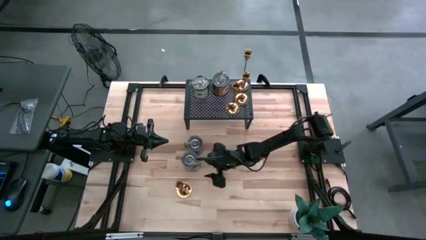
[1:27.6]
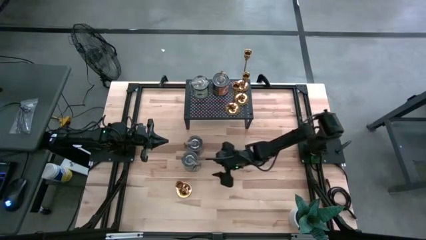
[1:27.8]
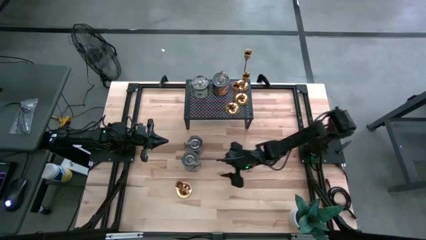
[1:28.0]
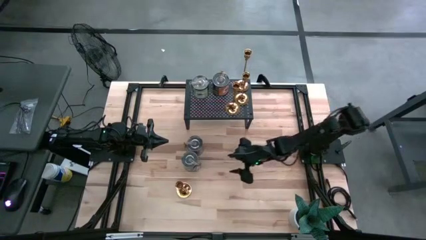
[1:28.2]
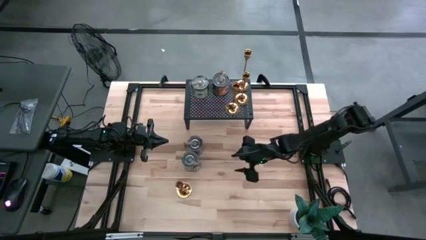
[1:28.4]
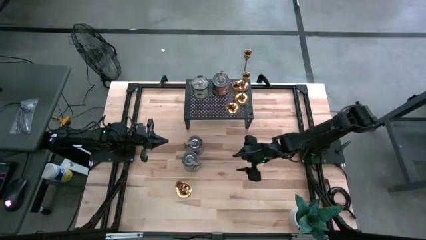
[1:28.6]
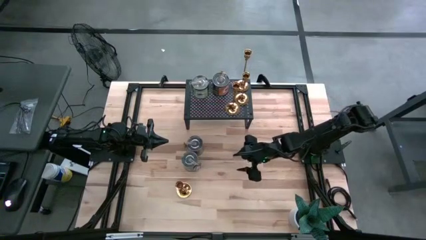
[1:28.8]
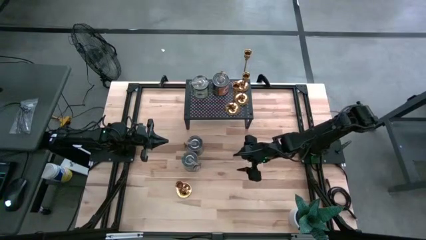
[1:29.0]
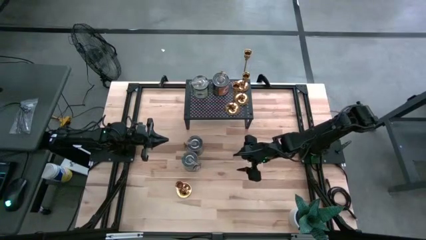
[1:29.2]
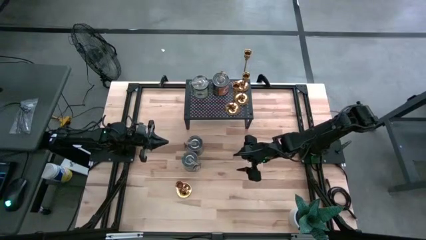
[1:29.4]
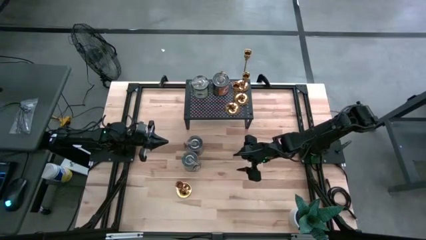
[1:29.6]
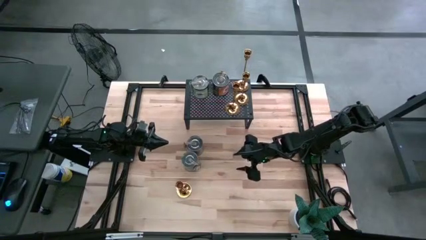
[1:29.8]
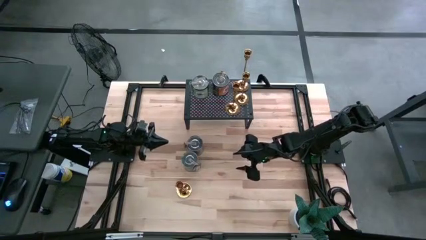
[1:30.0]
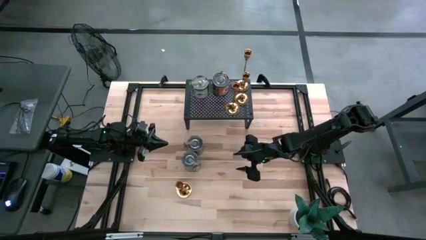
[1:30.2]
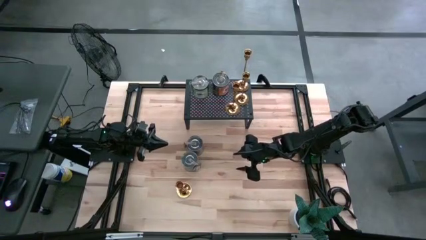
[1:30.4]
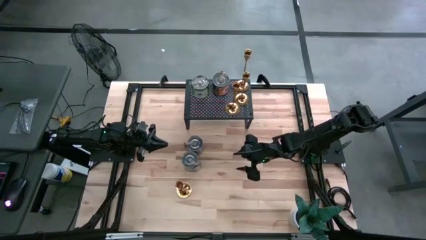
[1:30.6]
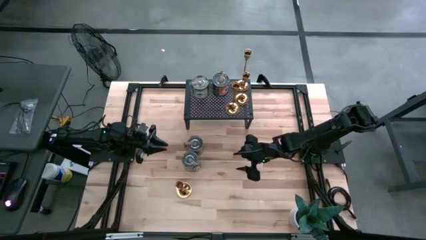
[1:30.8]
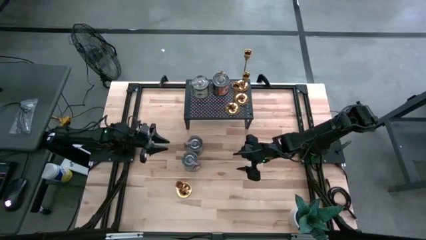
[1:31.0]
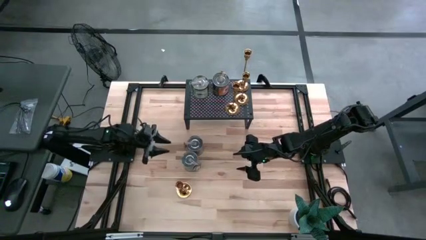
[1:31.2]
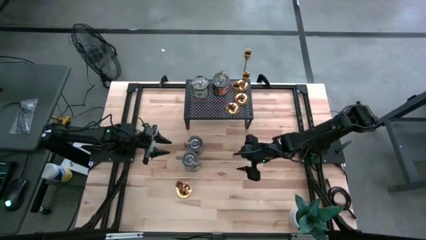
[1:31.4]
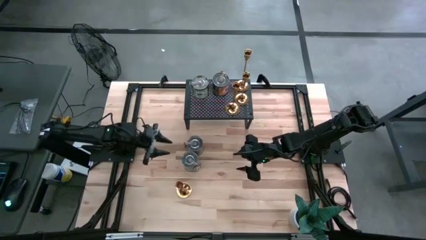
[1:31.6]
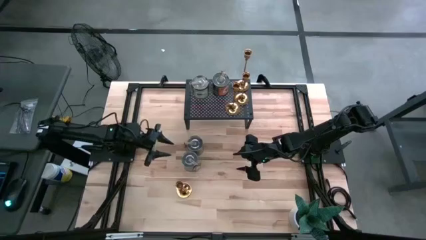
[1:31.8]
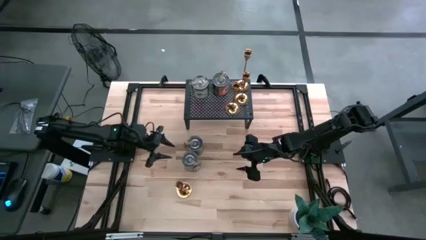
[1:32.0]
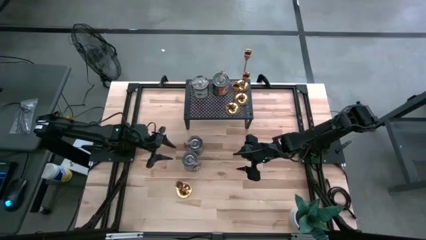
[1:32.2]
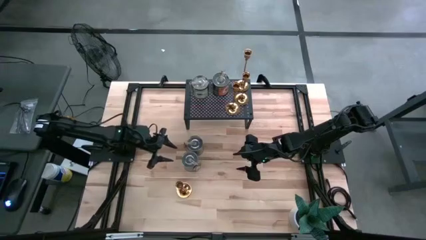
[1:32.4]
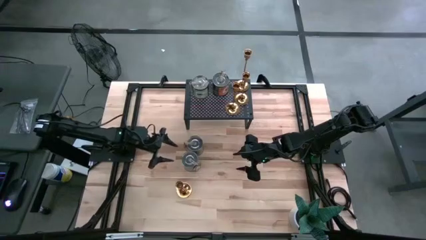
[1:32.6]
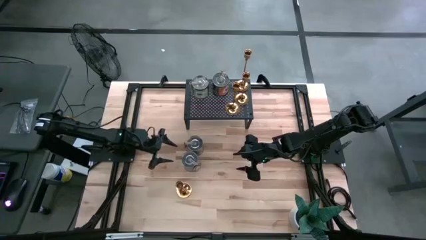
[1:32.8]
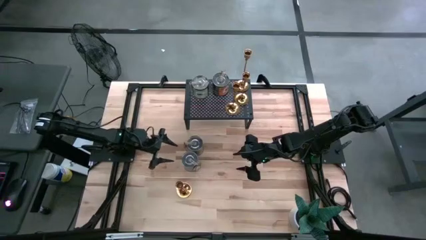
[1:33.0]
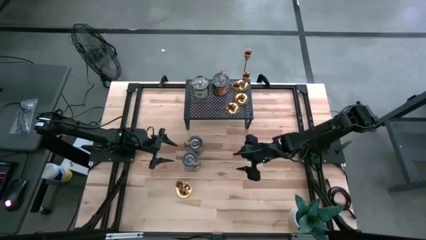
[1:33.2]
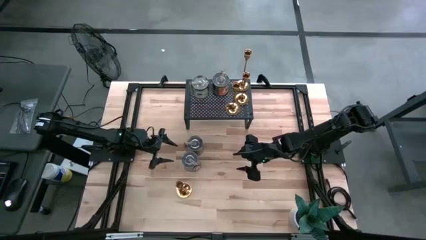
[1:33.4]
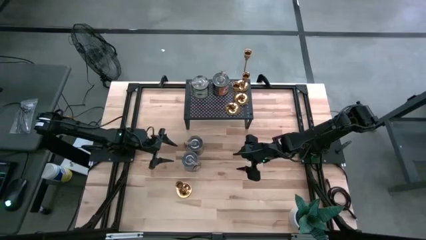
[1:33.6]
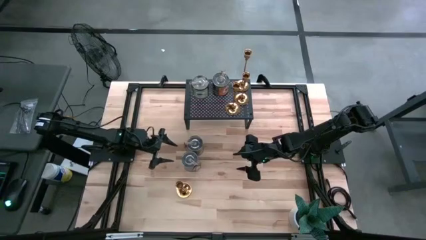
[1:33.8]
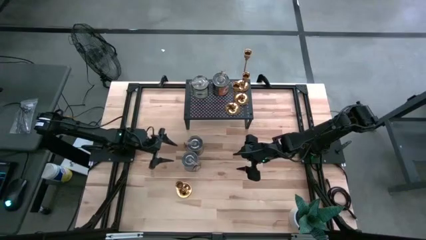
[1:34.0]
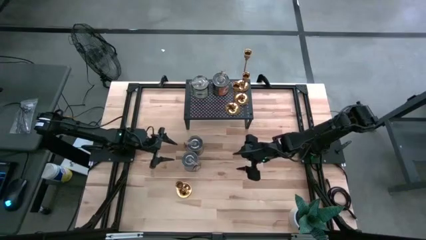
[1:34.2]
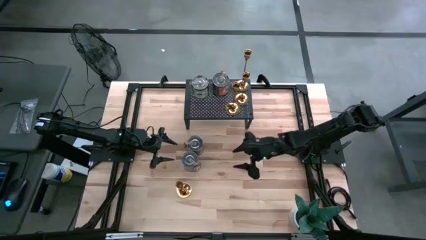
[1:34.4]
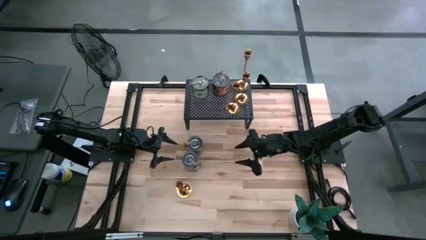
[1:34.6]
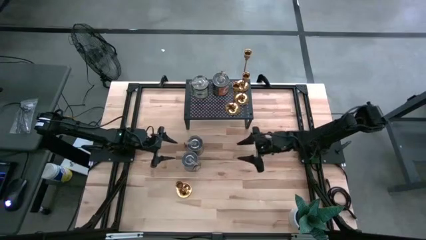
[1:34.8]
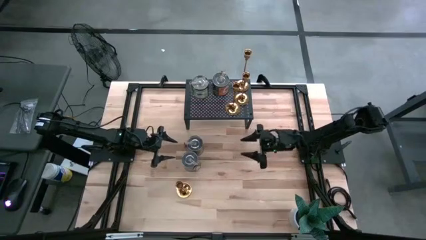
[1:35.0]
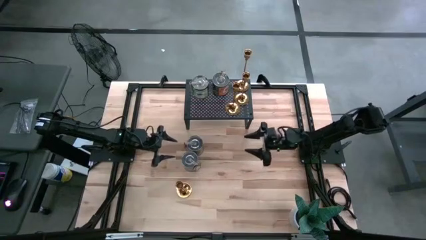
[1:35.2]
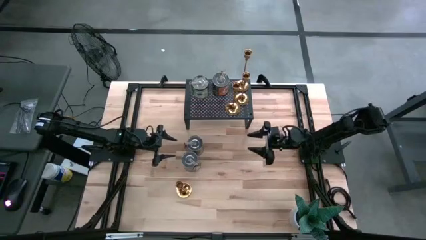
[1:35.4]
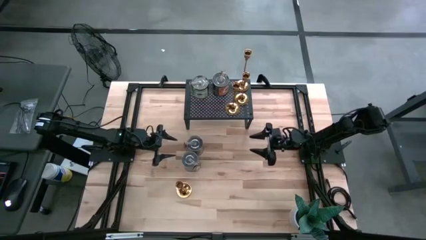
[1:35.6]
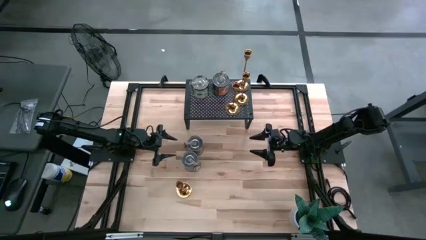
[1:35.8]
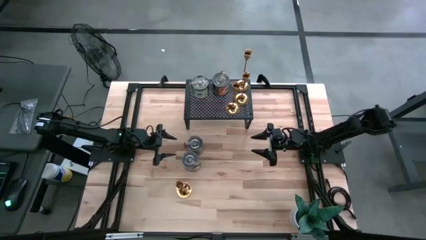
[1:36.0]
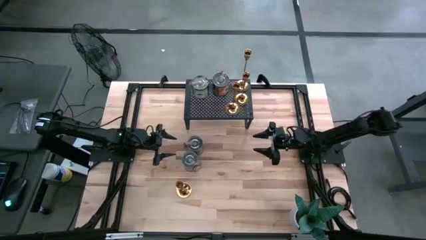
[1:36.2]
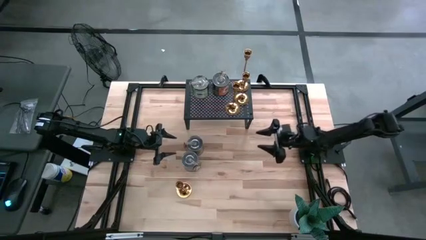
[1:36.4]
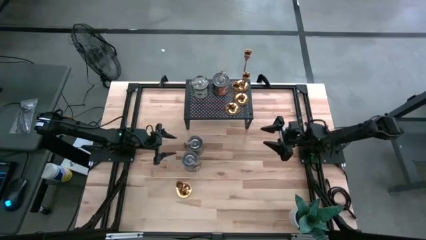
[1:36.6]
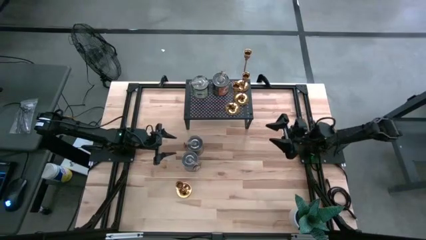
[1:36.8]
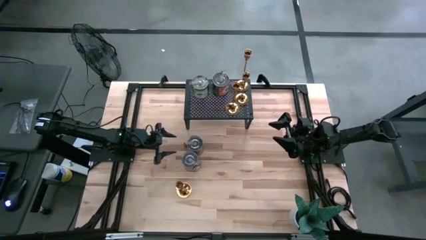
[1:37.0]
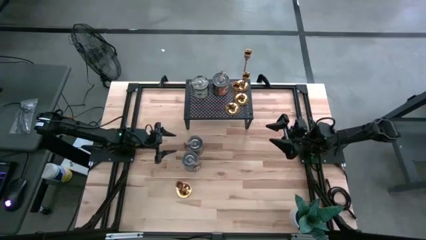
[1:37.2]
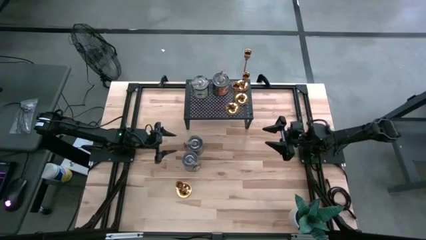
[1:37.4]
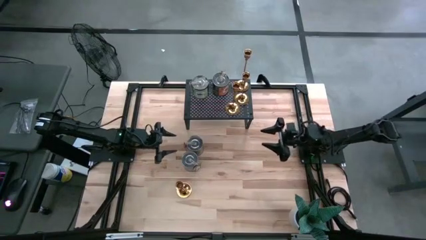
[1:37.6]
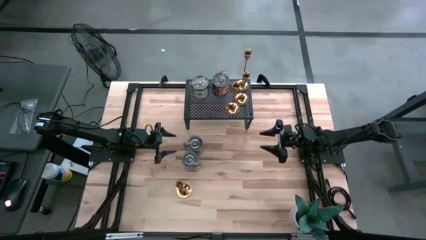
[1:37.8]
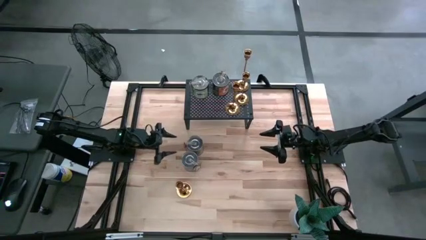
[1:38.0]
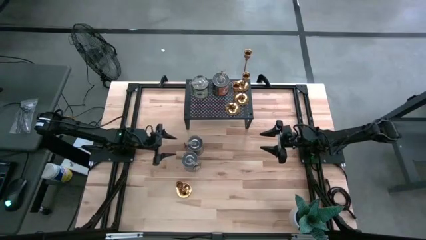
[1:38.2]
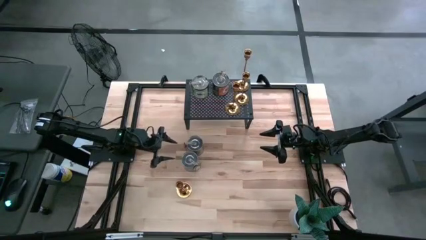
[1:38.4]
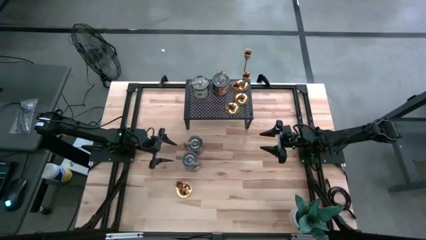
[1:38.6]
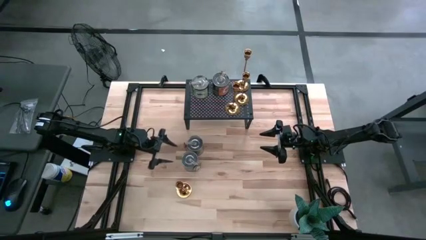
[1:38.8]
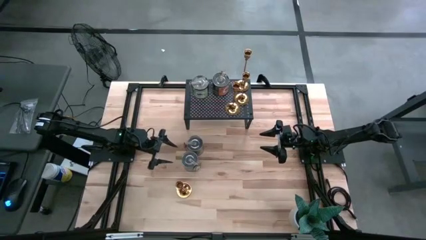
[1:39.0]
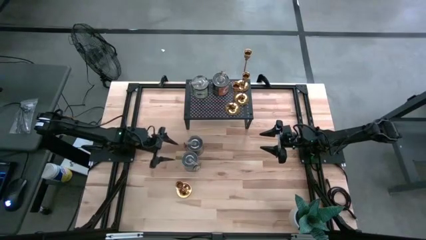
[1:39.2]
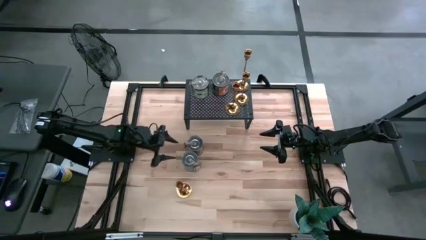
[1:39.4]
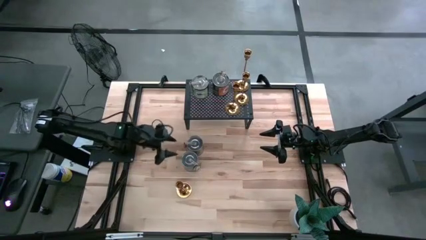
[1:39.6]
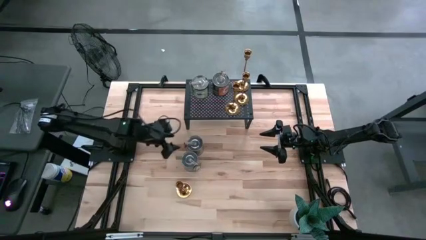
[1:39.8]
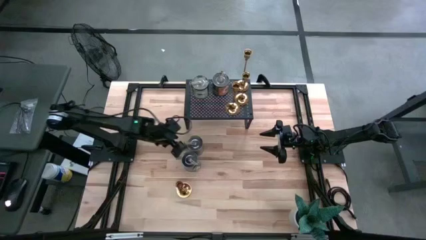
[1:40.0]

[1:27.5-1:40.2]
Task: Pick & Place candle stick holders
Align the brown scented candle with the orange scented candle on the shelf

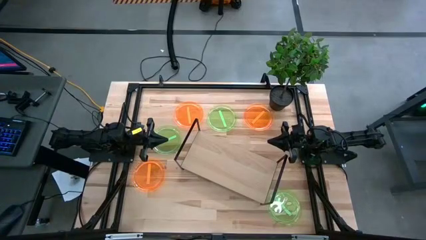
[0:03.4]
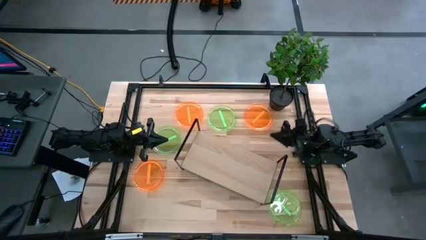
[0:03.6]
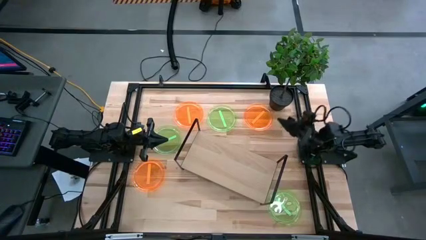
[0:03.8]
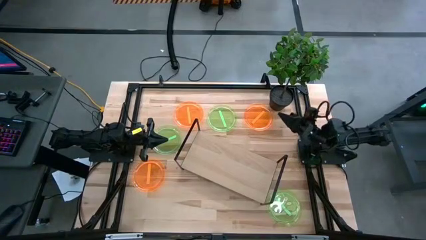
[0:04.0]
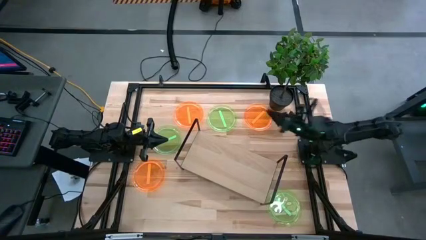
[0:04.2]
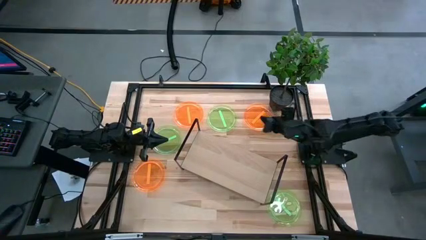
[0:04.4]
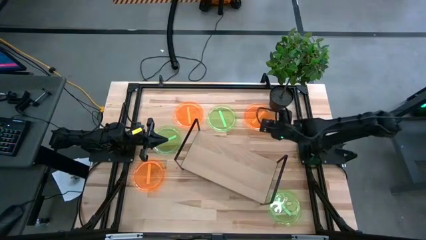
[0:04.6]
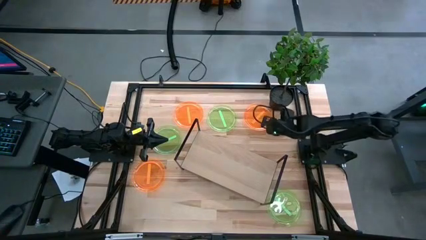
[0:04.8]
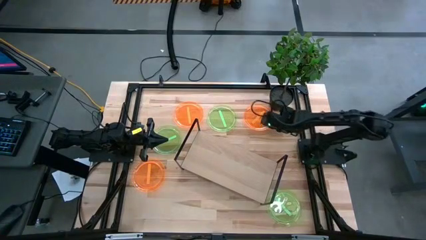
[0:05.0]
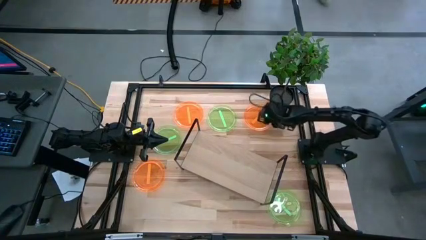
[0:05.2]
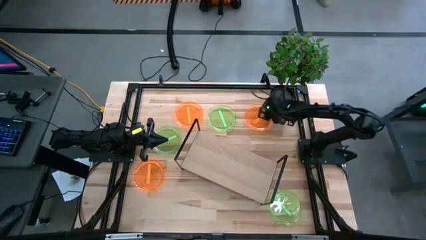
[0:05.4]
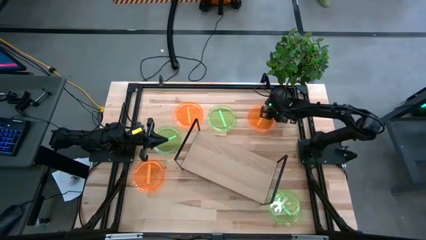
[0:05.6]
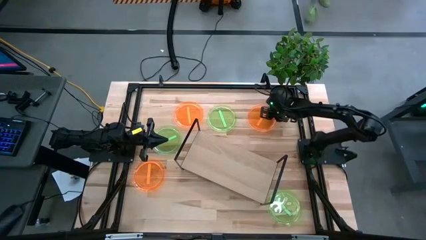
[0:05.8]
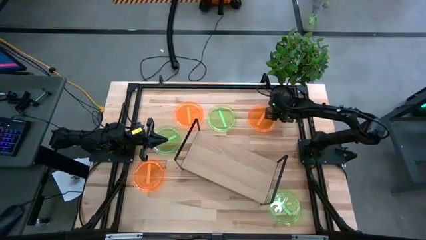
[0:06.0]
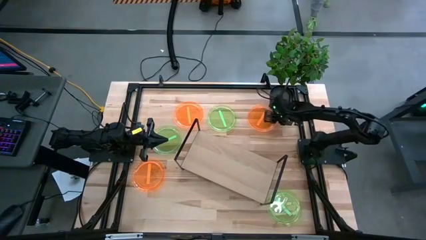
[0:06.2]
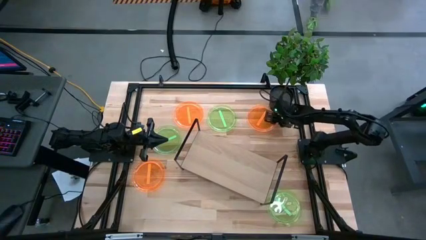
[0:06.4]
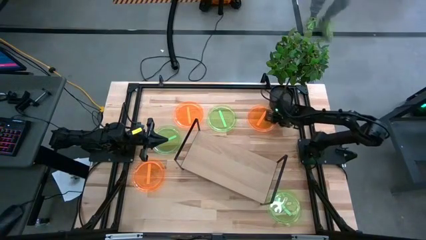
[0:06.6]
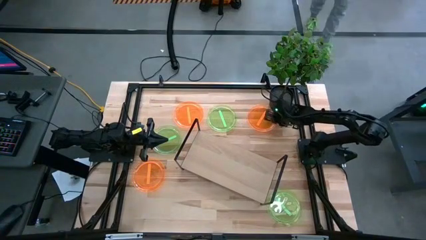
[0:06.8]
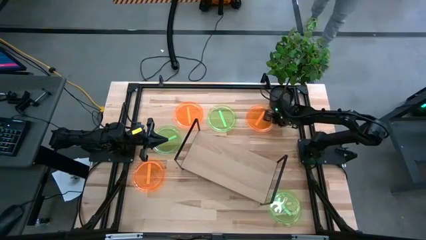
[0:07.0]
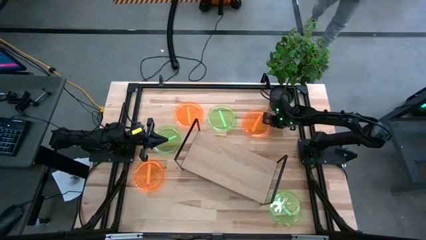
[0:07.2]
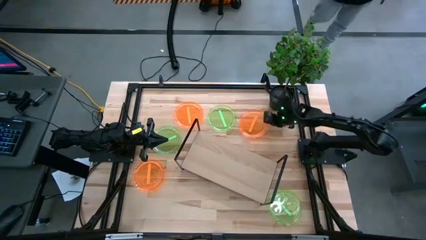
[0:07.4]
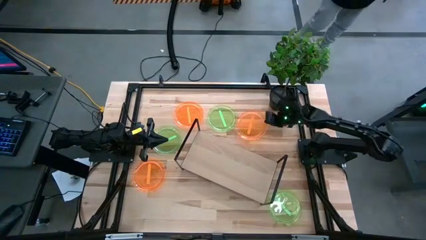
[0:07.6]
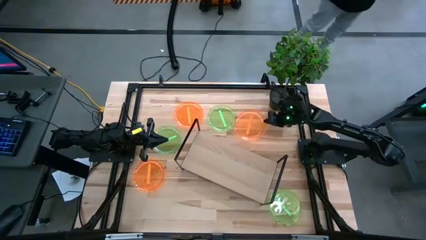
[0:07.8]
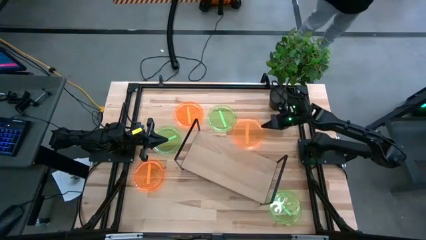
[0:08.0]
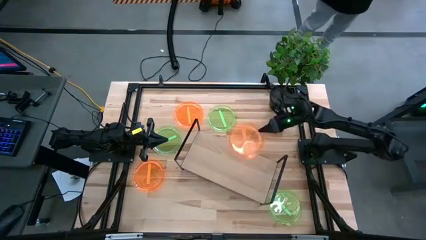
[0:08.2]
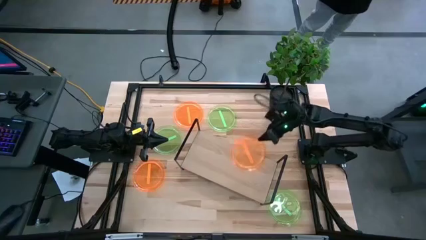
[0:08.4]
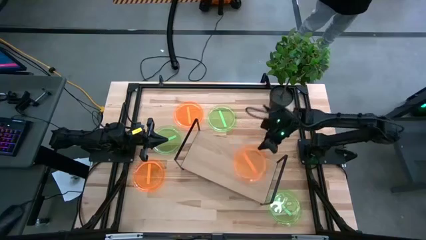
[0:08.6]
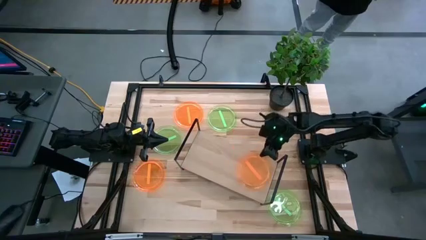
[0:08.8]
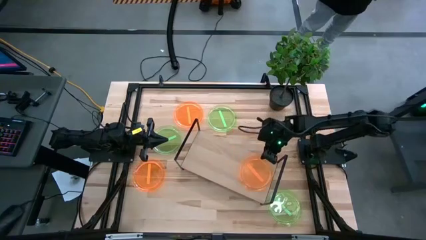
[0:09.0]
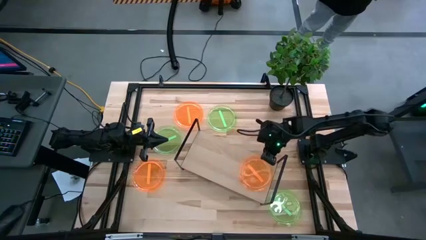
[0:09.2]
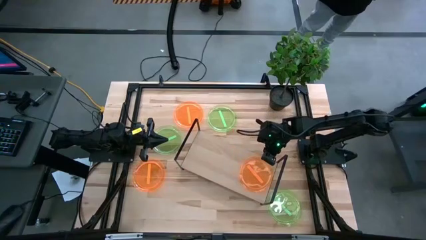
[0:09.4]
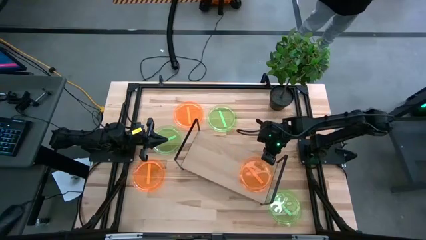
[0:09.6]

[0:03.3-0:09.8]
Task: Place and stack plates onto a shelf
Put the top right orange plate into the shelf
